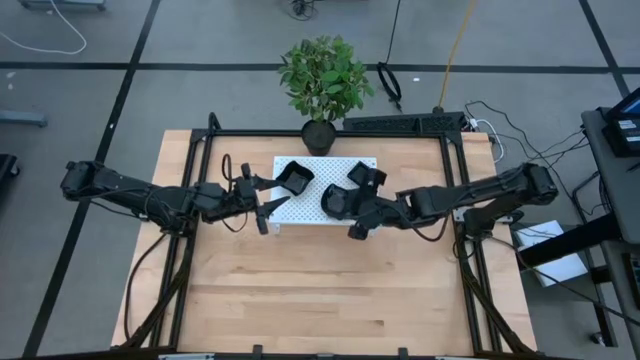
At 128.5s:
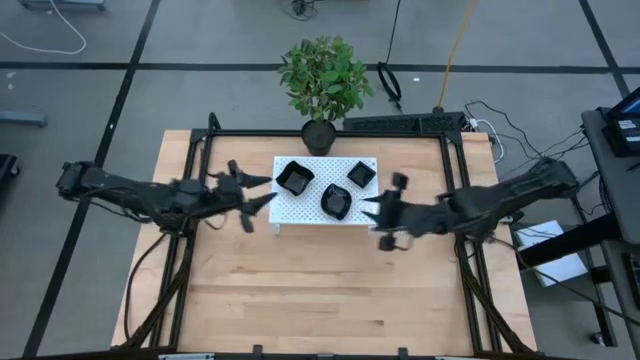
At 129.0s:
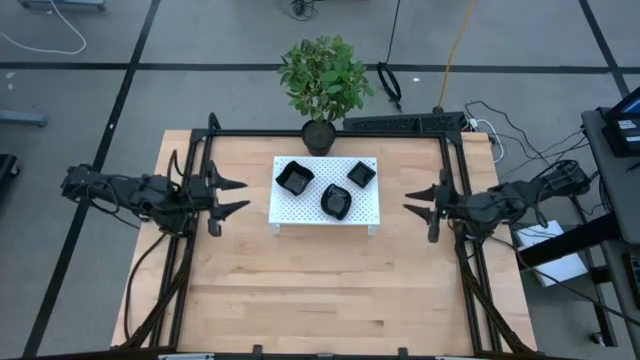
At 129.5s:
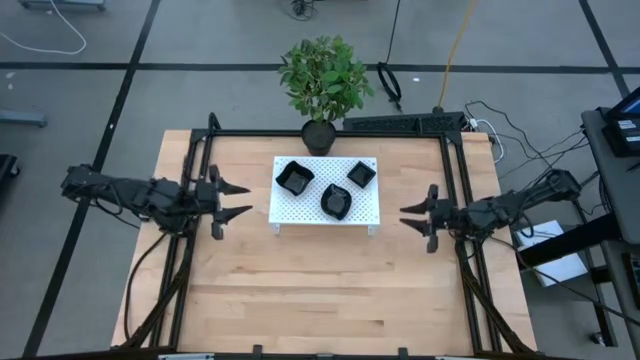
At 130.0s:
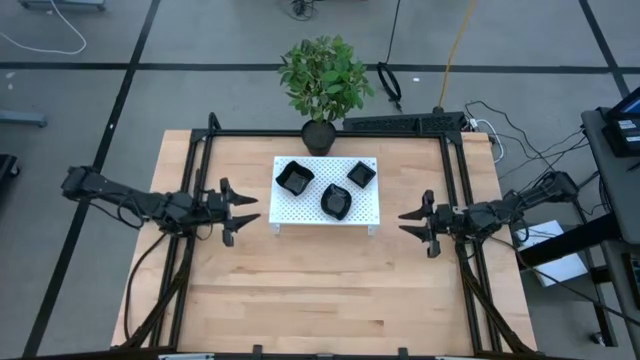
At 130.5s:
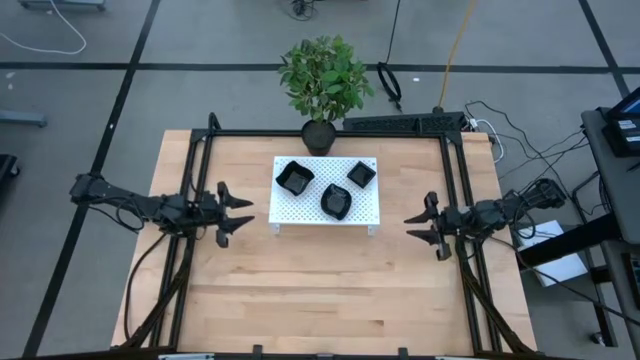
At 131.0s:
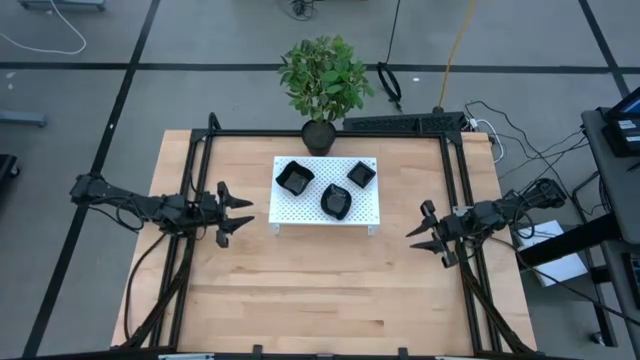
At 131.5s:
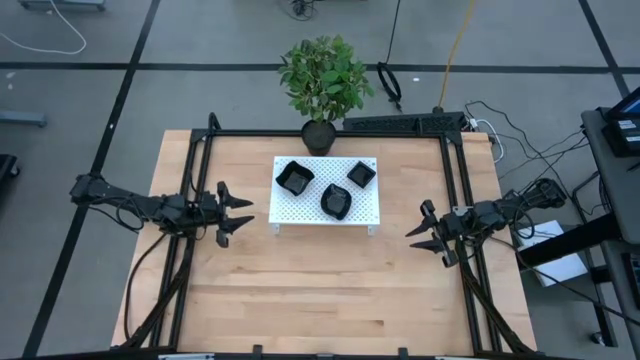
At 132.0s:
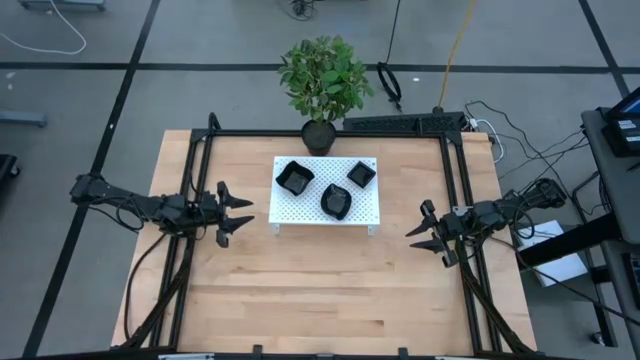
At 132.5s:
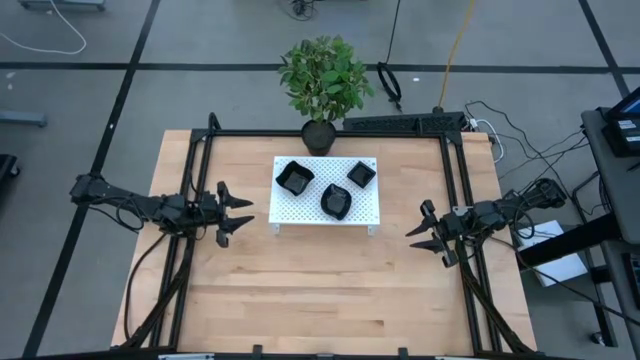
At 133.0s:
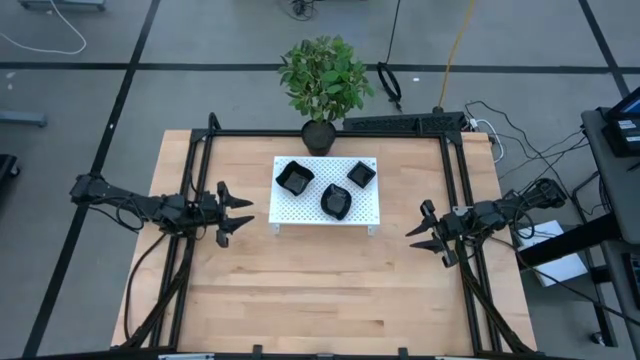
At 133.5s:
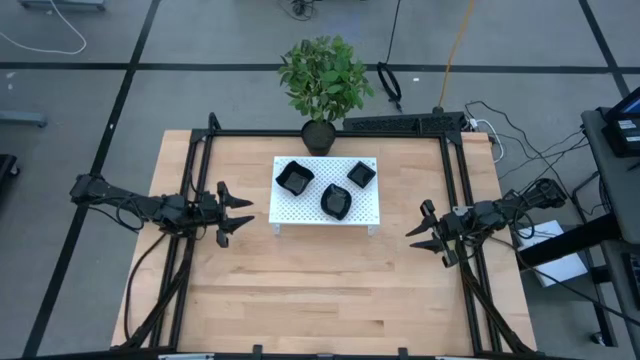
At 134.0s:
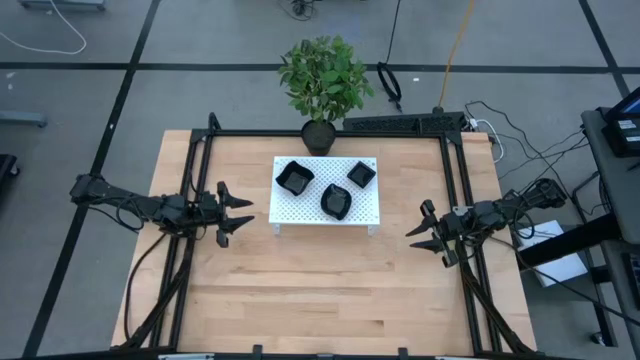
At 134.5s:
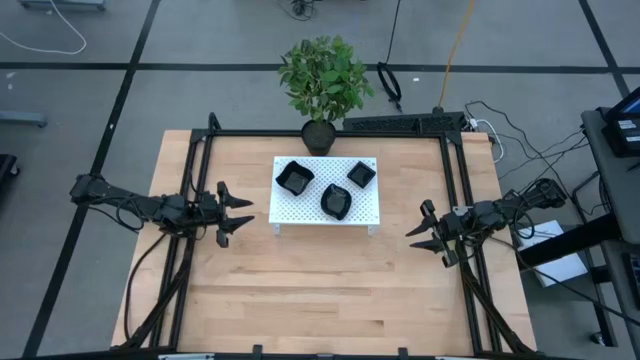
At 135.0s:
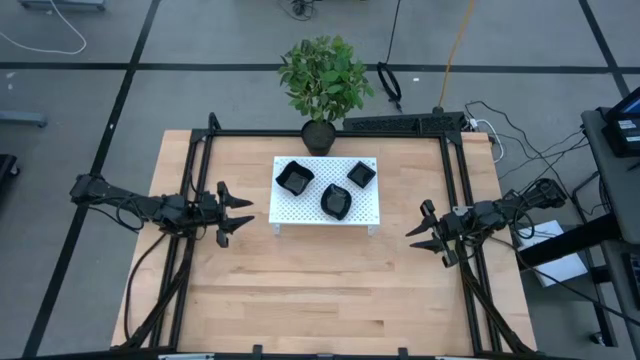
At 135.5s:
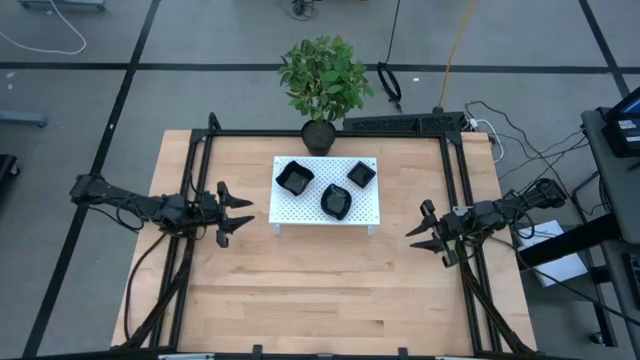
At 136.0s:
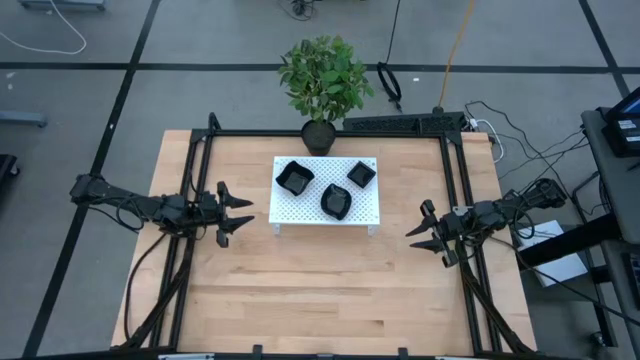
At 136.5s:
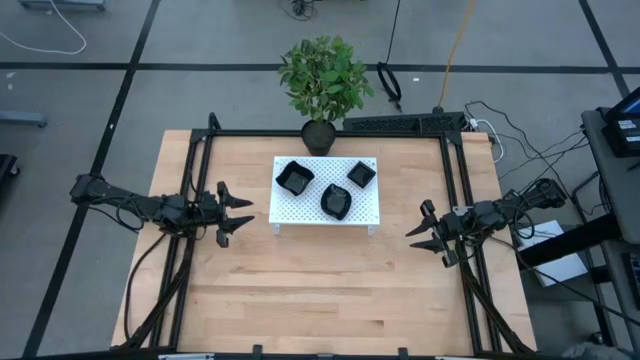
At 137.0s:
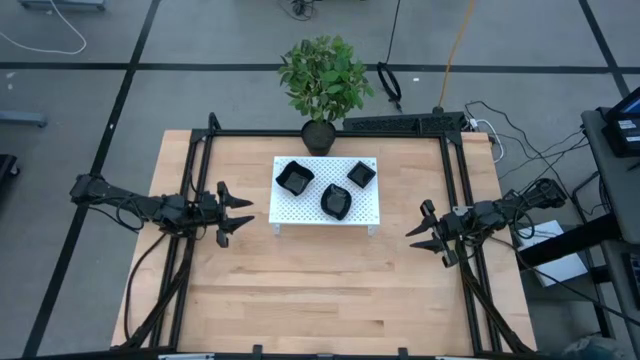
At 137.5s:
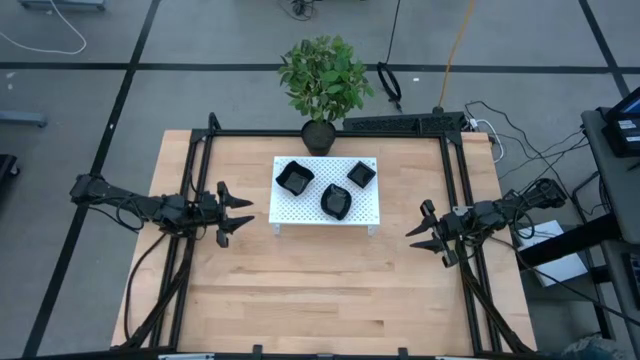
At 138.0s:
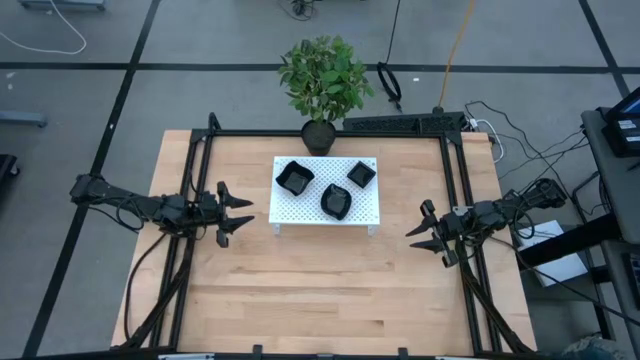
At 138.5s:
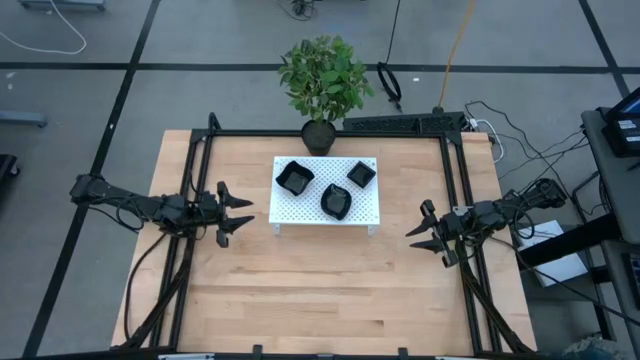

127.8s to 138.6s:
Task: Pick & Place Mini shaped plates
Return to Home Position

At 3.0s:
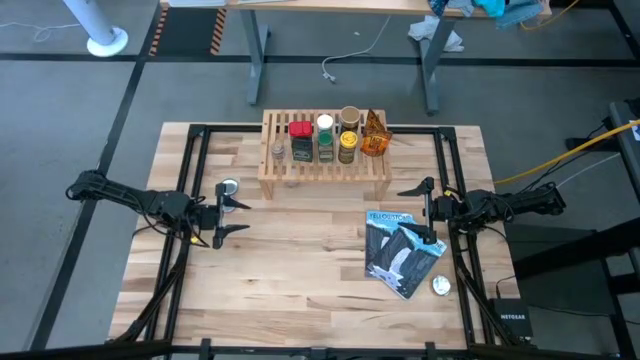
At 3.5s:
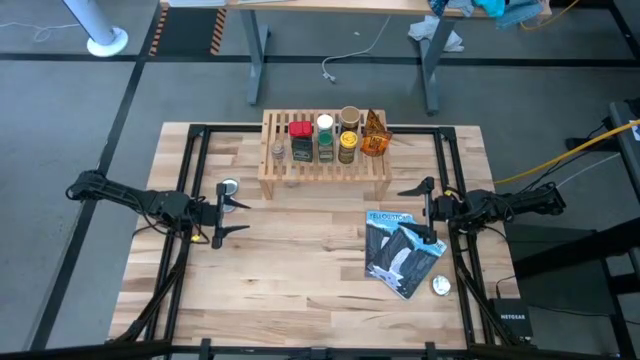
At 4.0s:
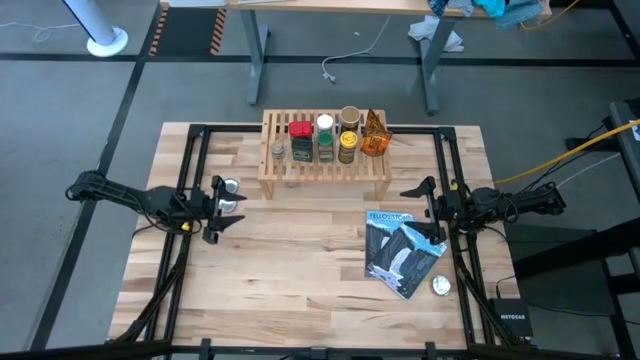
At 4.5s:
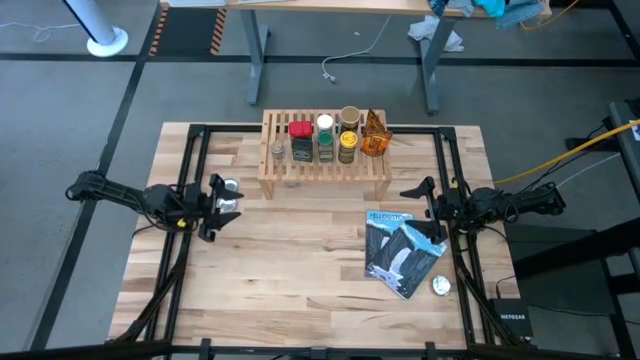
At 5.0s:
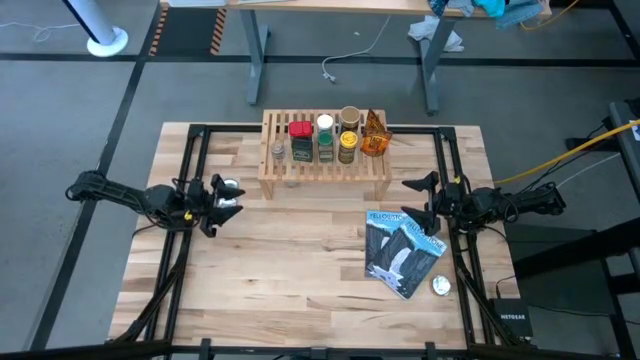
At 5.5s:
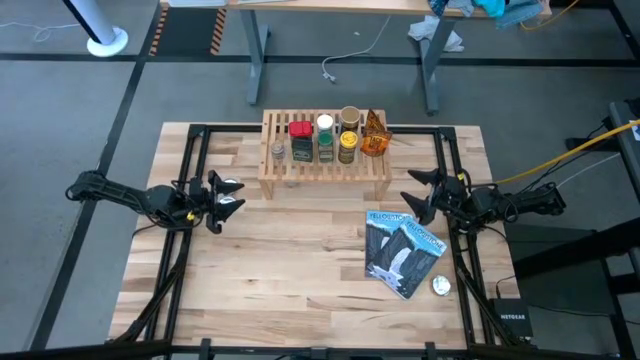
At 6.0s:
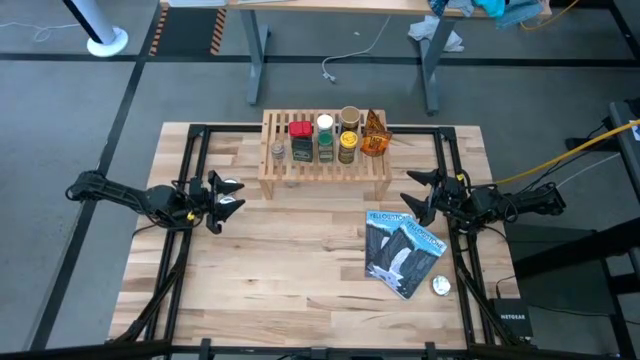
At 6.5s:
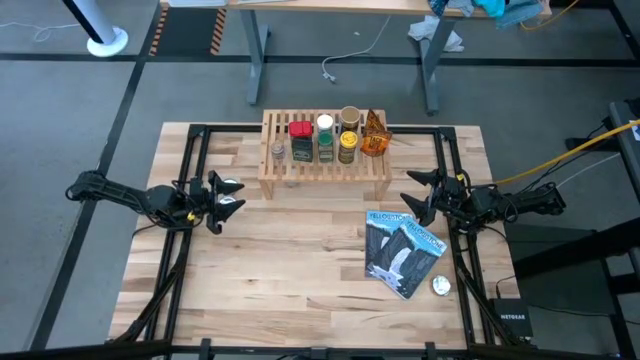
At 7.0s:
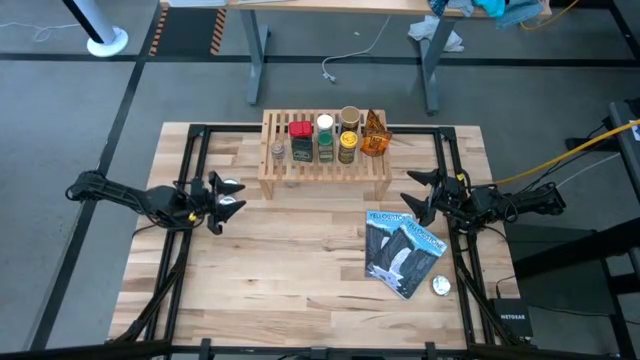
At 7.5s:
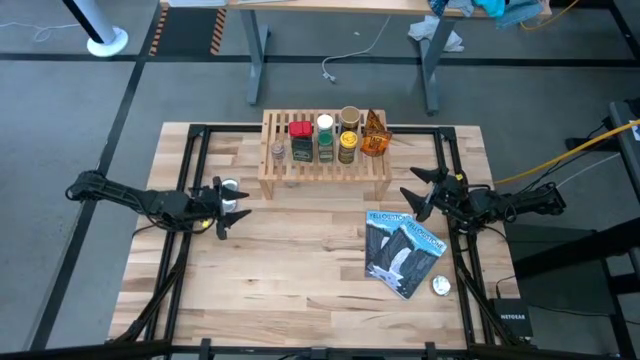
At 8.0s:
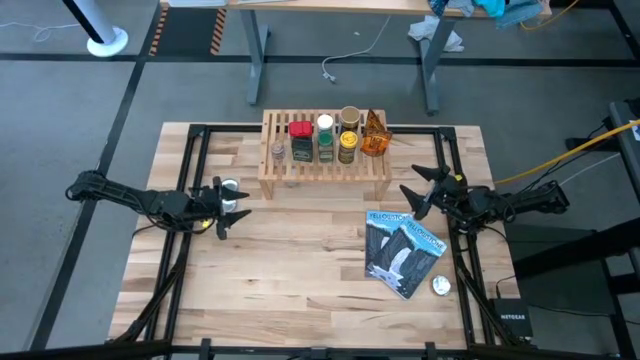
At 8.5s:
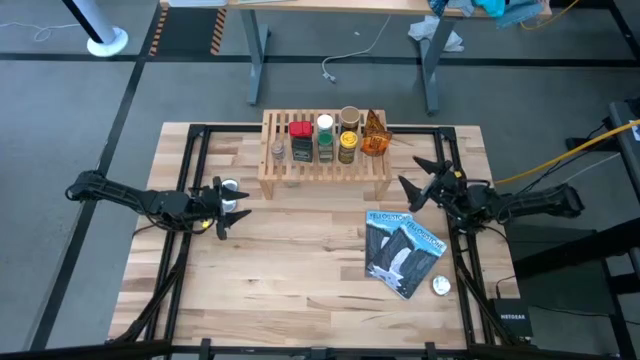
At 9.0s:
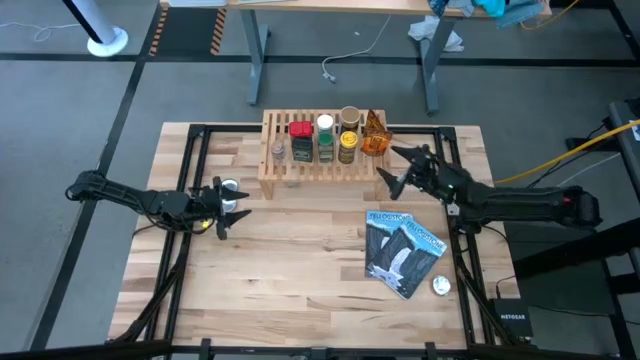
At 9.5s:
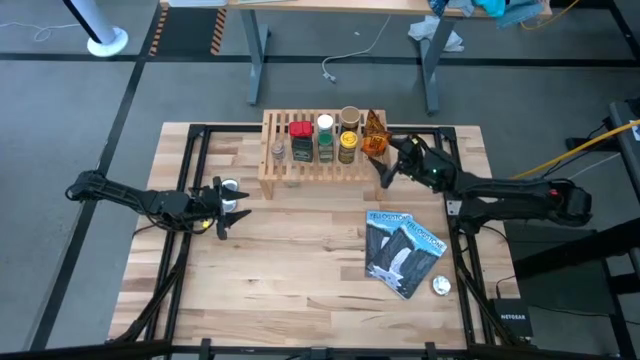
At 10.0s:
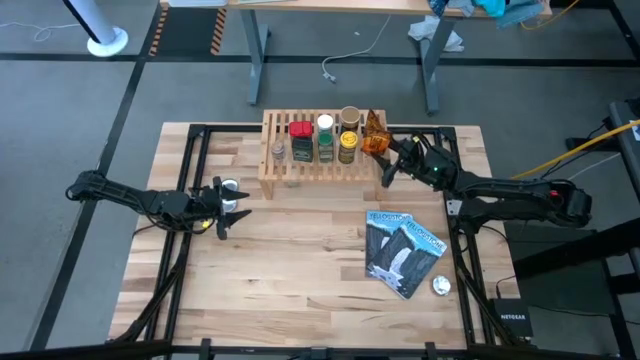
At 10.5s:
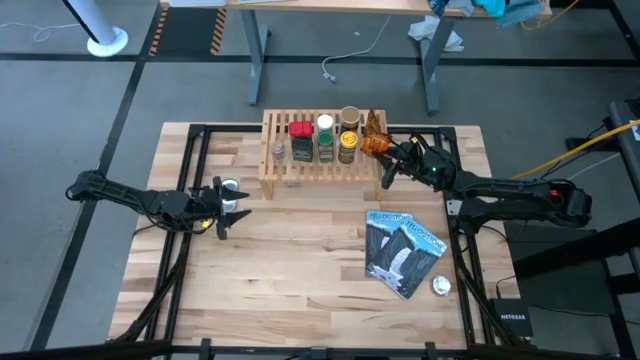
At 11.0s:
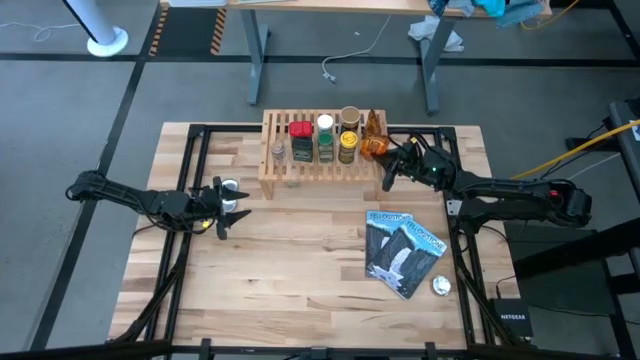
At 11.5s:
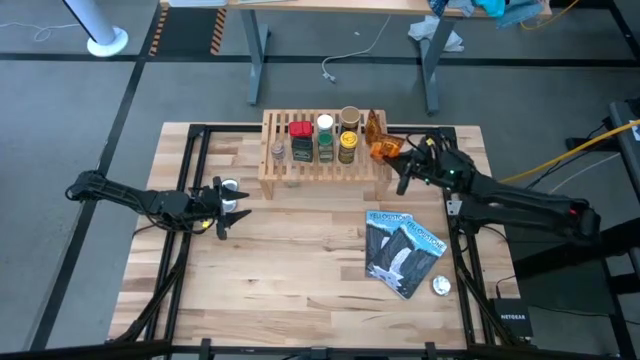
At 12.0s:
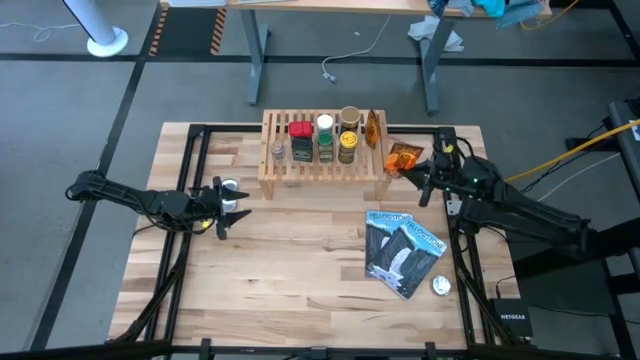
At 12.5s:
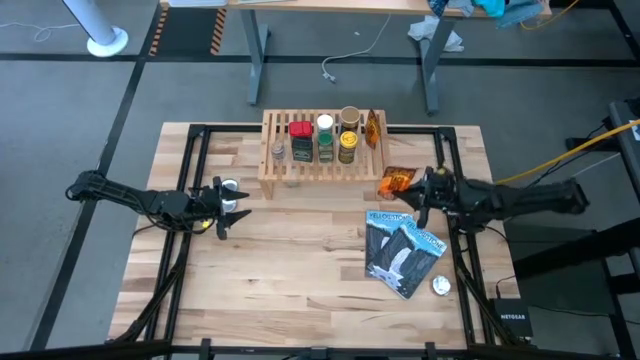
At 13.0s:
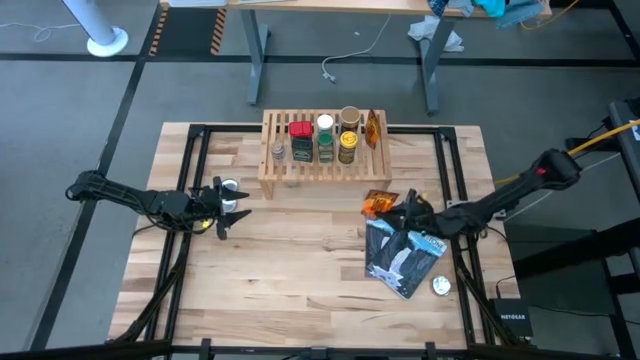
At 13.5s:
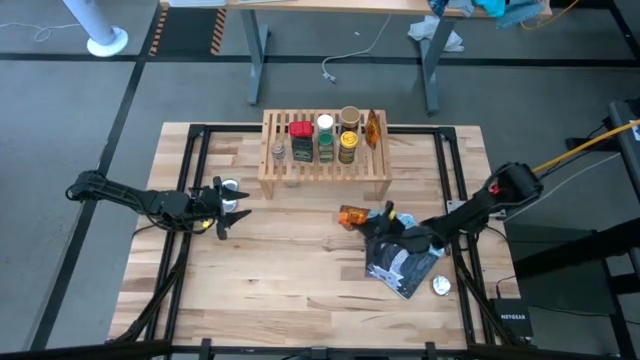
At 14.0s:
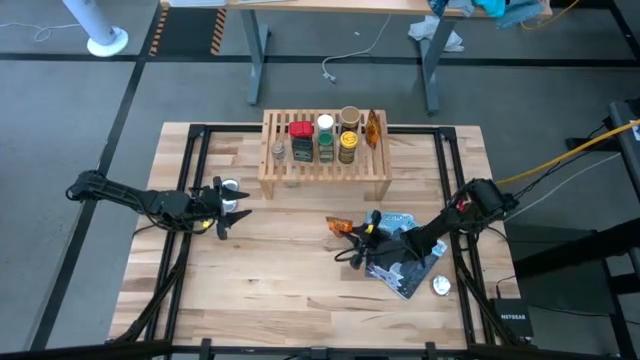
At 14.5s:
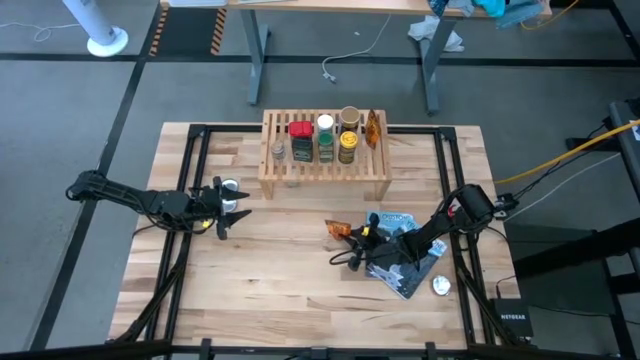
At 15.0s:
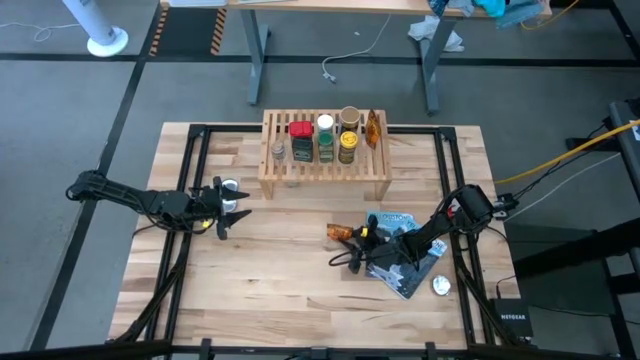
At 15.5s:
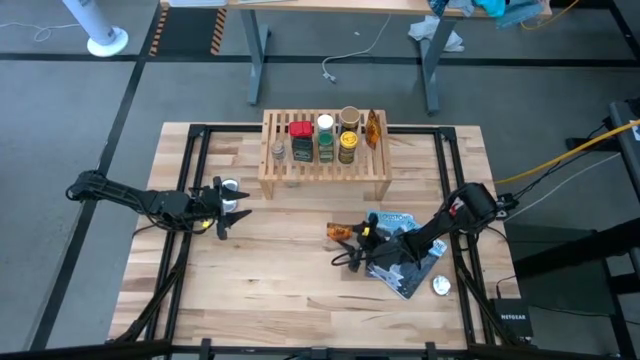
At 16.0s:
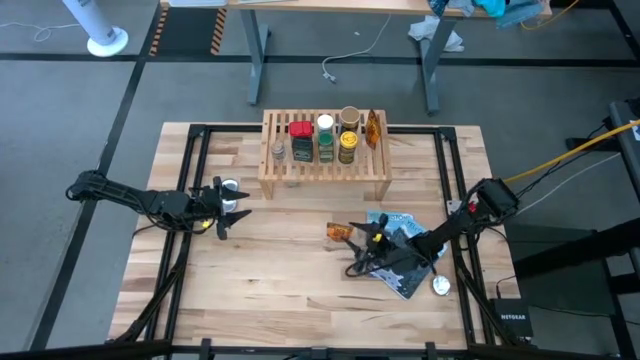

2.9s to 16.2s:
Task: Shelf spices
Remove the bottom orange seasoning pack from the shelf
